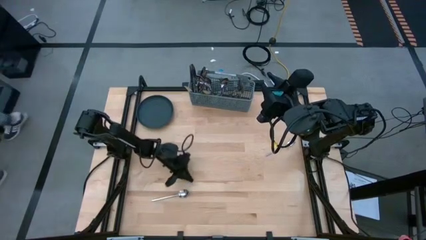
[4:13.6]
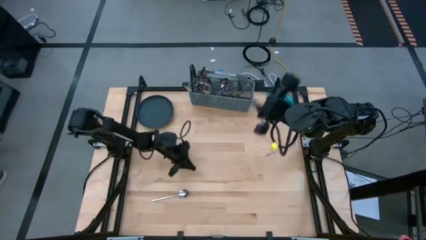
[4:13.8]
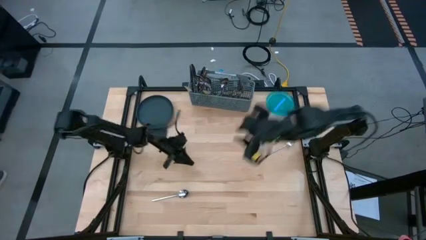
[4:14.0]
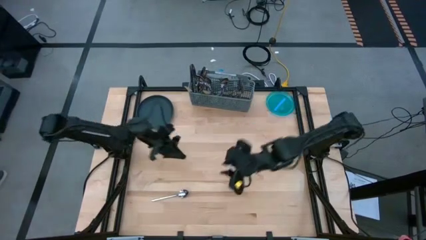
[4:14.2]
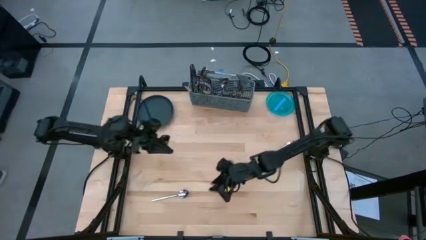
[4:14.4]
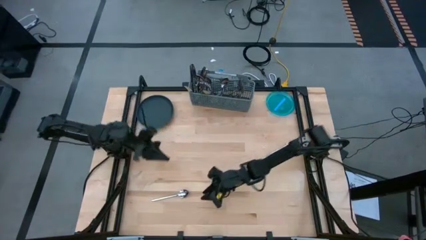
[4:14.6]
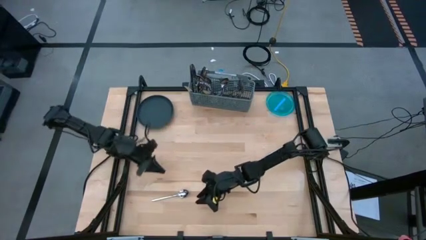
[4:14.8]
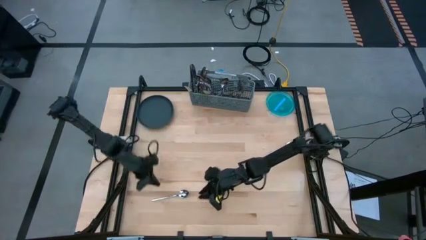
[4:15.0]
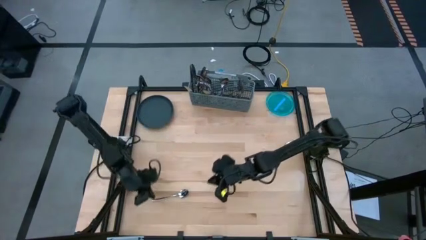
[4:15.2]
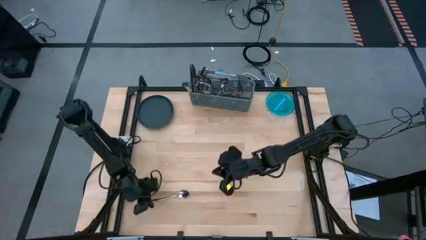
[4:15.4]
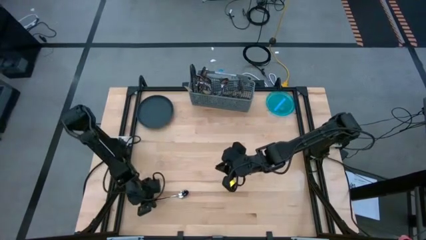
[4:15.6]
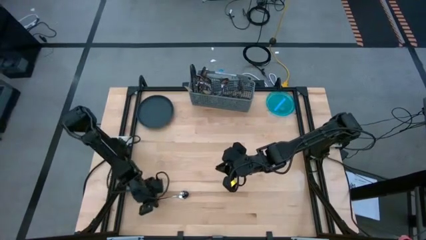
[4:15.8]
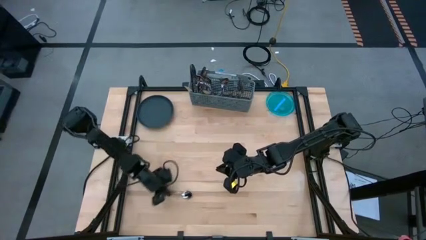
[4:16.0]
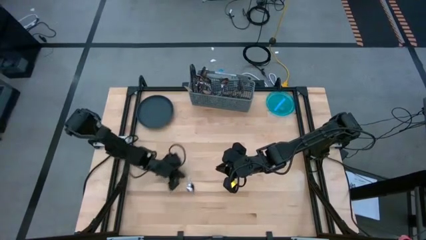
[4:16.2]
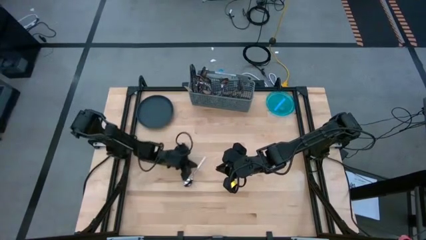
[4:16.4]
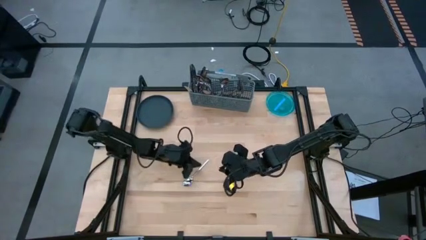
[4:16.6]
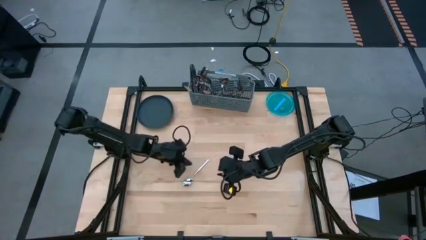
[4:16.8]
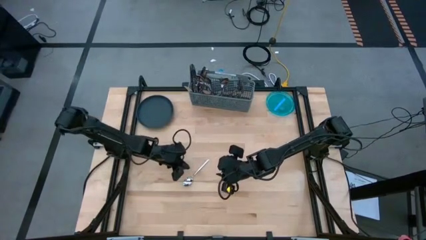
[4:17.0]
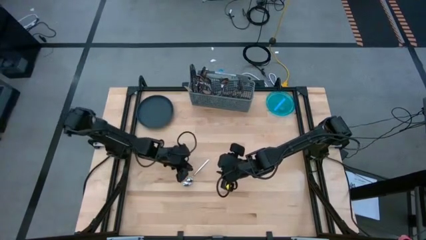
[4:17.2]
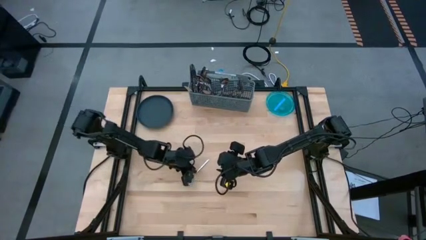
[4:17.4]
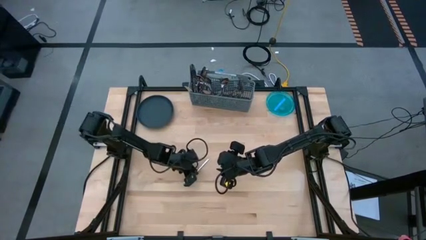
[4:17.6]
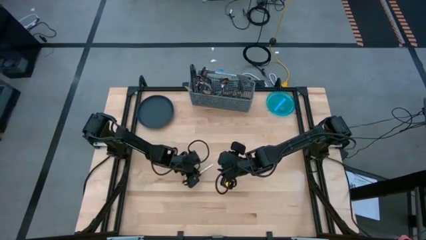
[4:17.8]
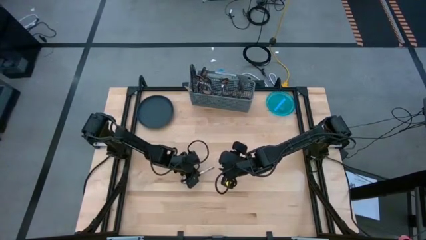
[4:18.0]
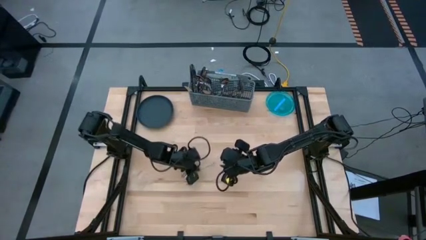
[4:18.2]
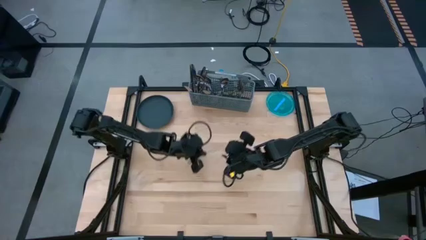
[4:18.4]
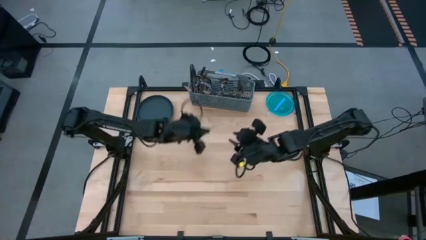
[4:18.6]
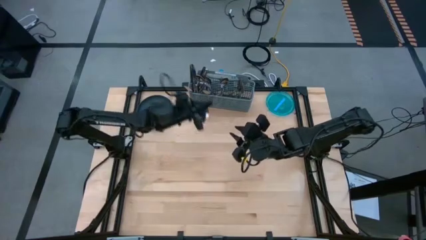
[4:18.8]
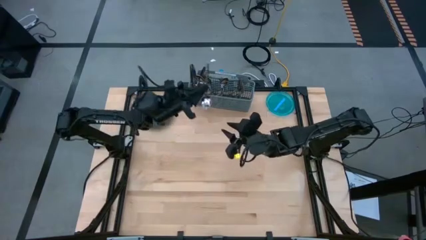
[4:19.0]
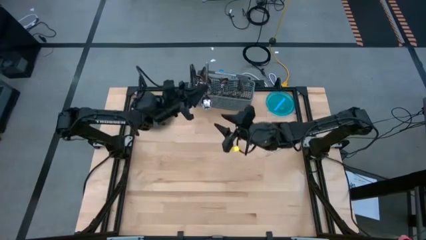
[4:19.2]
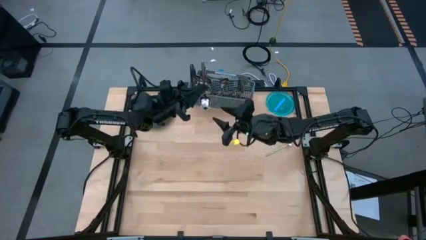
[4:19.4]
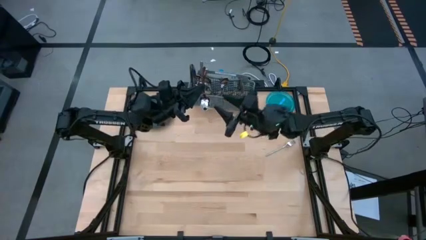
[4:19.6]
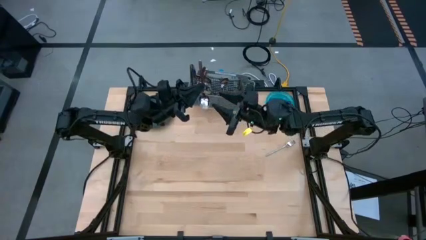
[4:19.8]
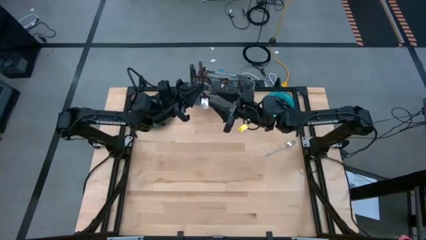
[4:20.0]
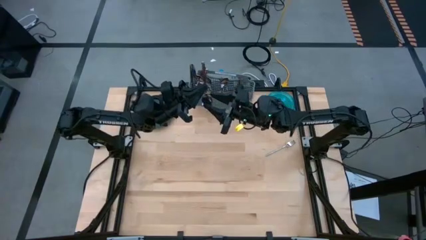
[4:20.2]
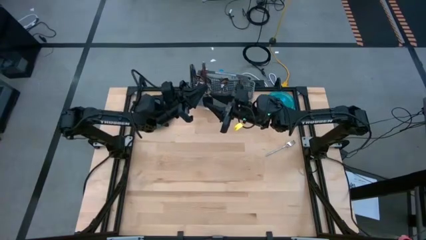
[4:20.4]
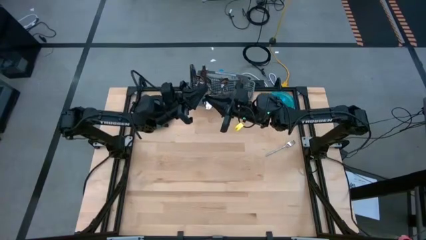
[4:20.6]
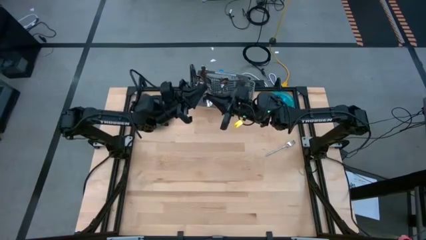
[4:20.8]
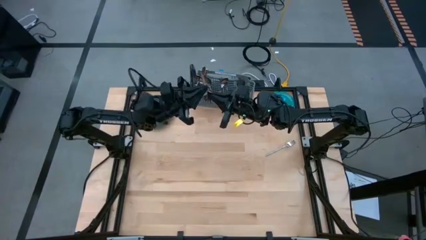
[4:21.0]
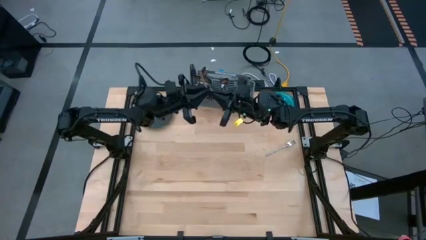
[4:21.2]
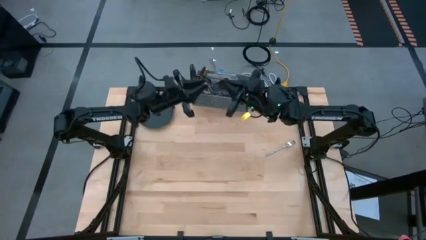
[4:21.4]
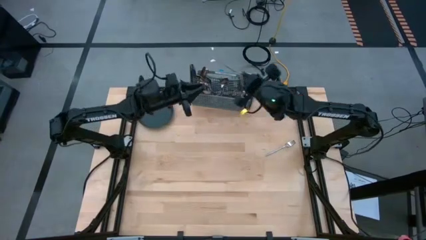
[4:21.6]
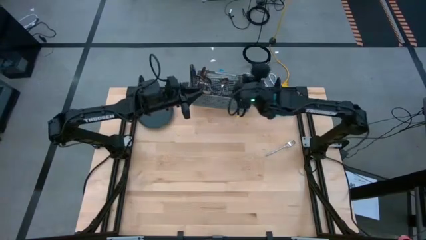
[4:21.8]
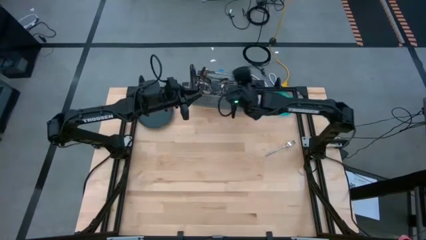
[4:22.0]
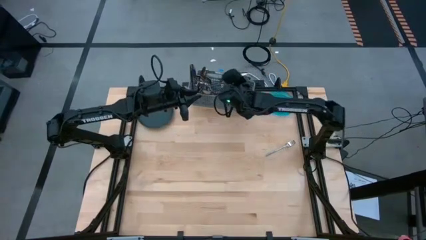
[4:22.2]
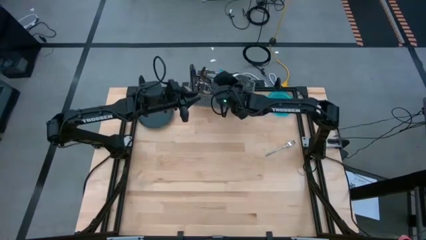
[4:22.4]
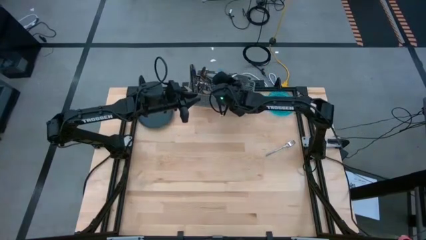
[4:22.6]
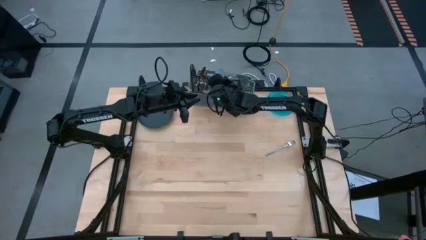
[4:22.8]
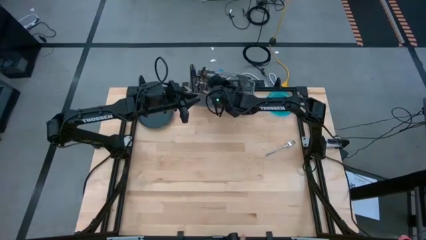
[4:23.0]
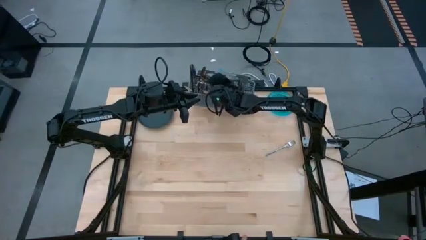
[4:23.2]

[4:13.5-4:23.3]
Task: Sort silverware
Put the spoon into the silverware basket

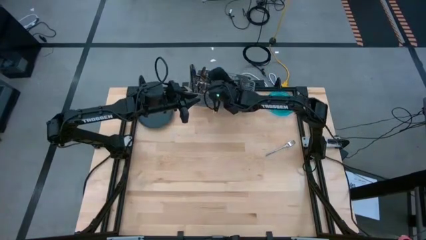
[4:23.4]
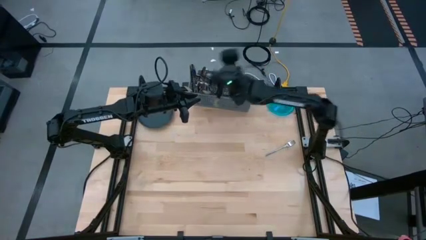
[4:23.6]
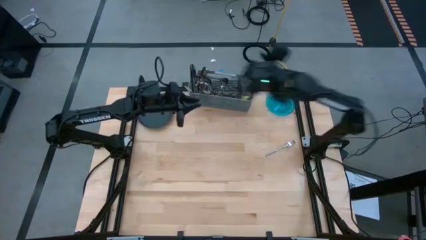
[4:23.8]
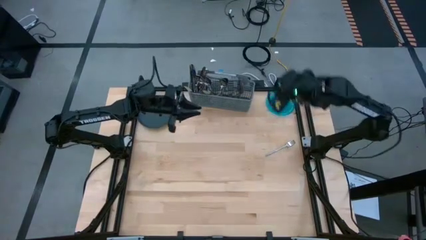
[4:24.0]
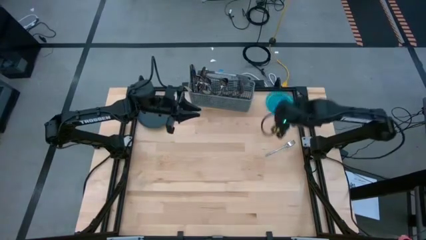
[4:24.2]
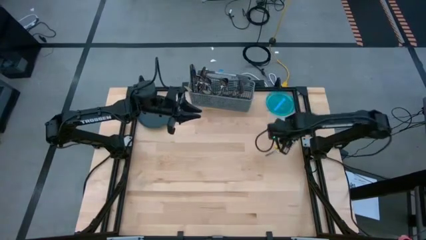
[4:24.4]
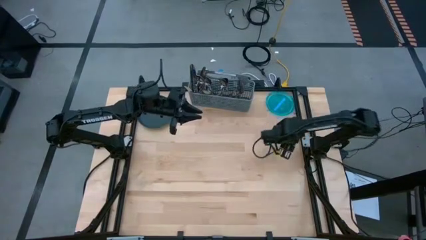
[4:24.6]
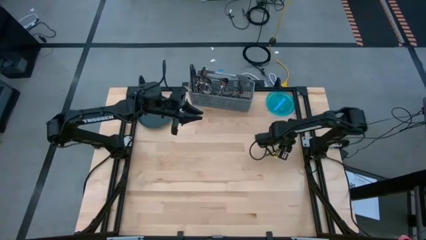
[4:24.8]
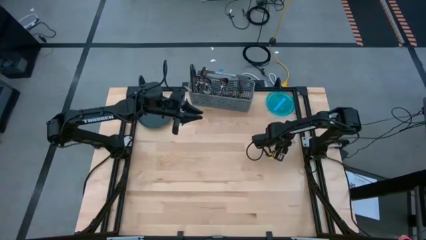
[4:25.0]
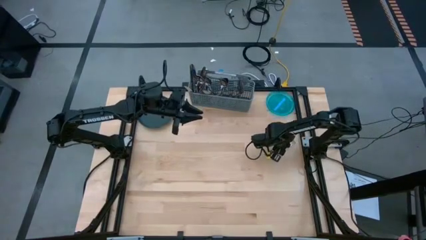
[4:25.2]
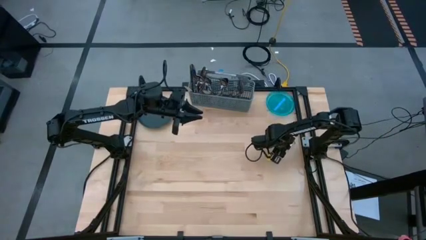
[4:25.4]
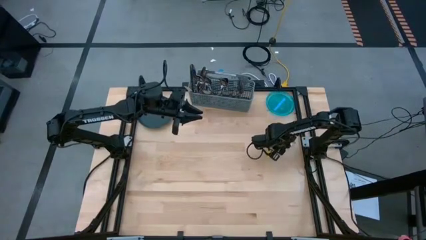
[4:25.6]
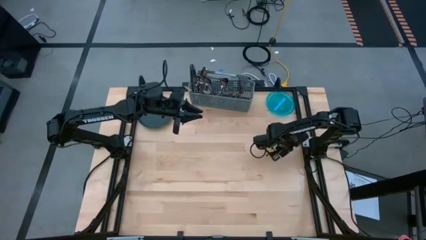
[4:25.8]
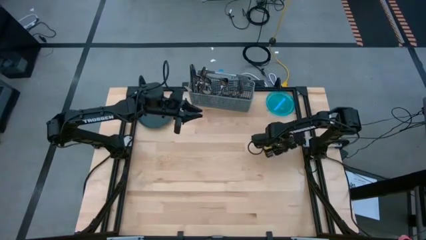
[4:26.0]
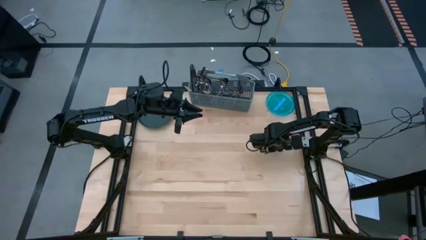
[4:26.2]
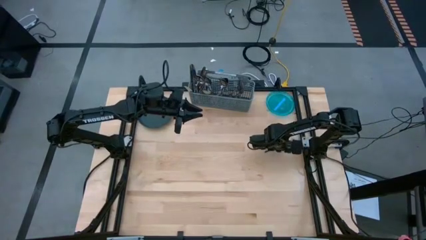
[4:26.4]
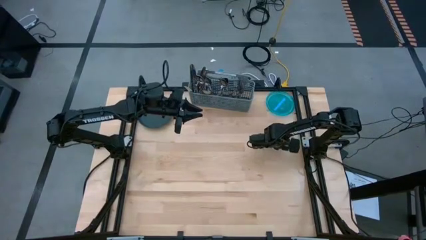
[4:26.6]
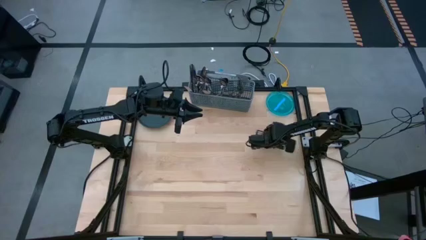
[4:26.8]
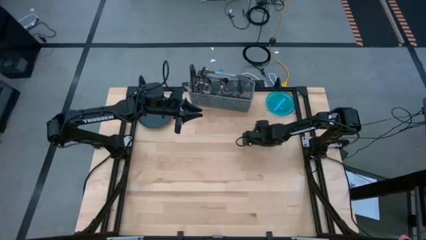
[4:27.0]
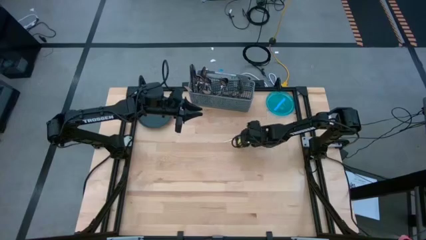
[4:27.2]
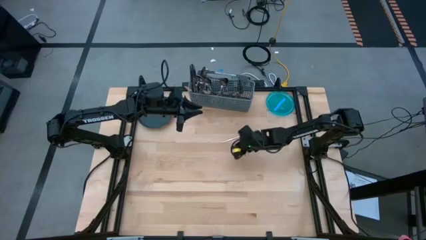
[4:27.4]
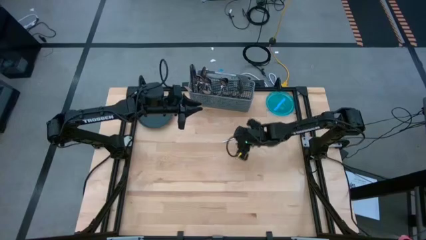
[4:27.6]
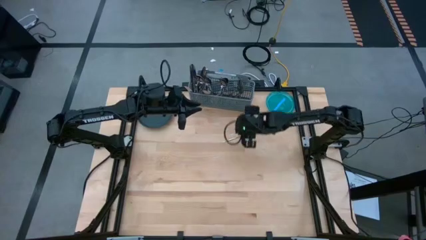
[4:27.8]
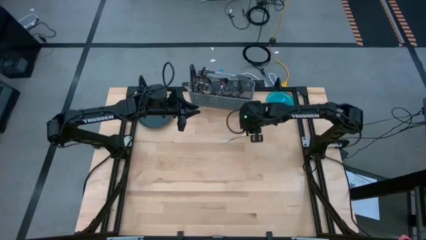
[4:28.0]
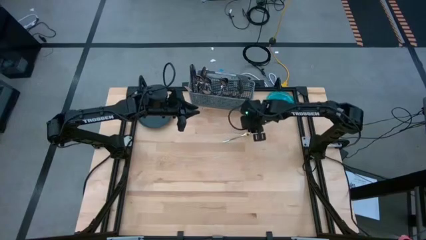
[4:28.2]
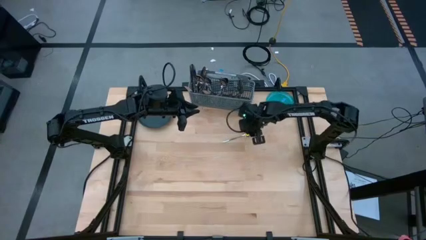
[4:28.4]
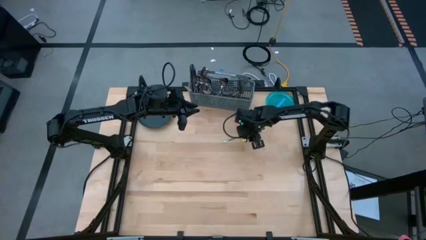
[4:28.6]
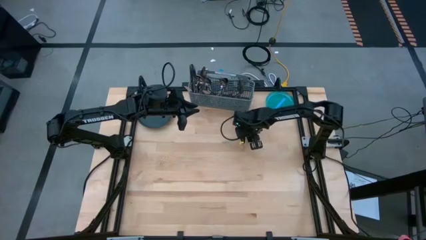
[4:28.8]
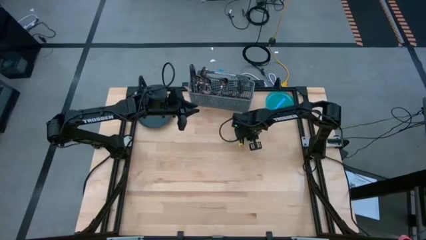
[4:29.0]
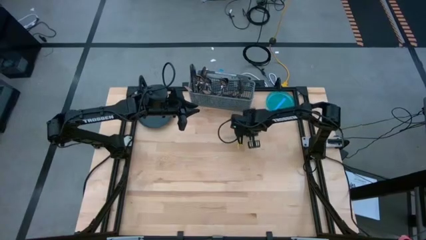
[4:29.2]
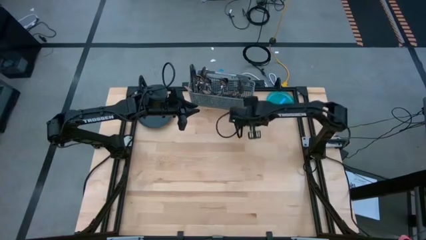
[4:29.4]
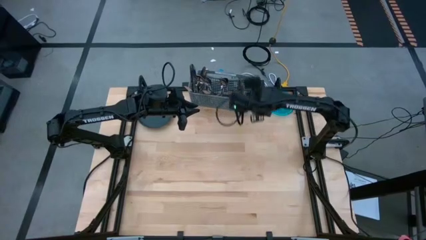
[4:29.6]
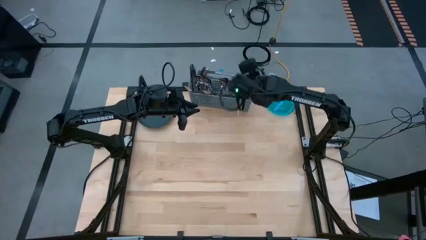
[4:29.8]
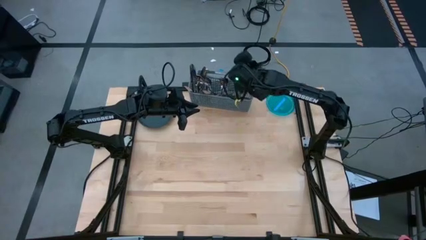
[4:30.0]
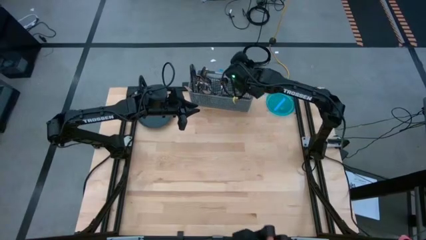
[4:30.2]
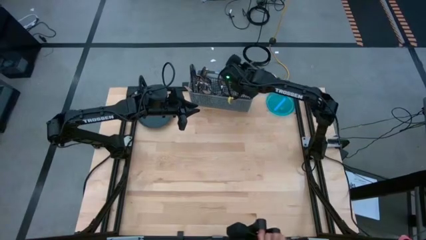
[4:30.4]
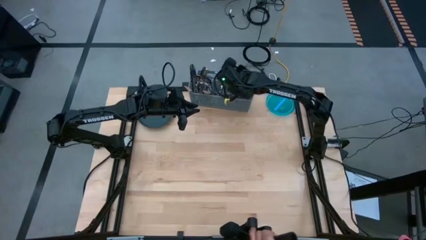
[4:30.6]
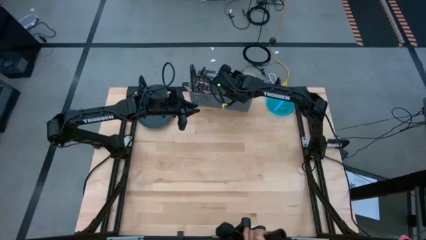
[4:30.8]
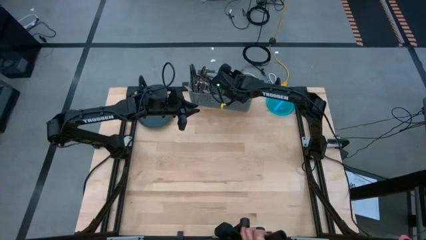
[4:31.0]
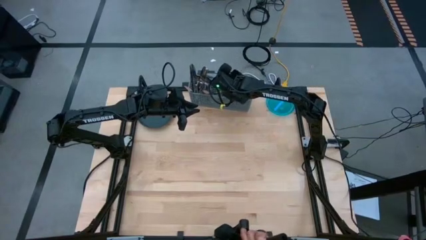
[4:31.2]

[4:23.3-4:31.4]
Put the fork into the silverware basket
